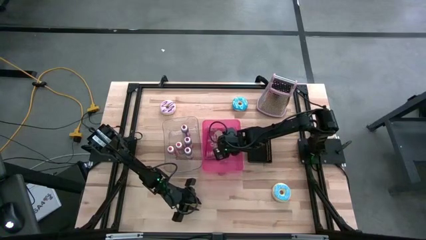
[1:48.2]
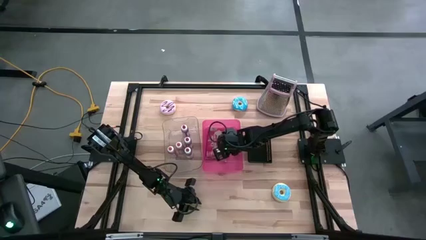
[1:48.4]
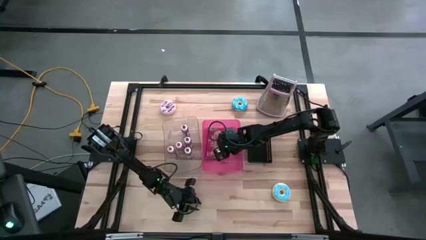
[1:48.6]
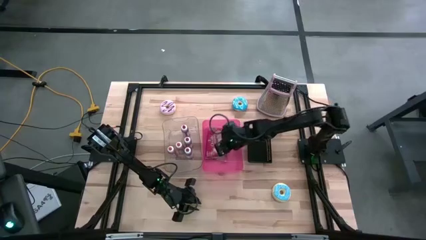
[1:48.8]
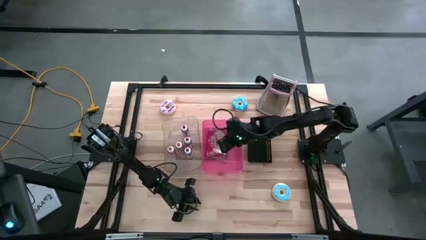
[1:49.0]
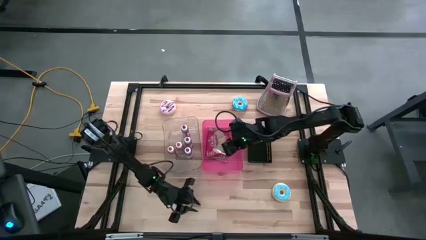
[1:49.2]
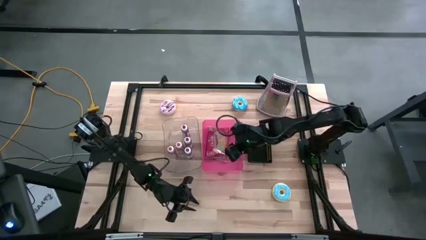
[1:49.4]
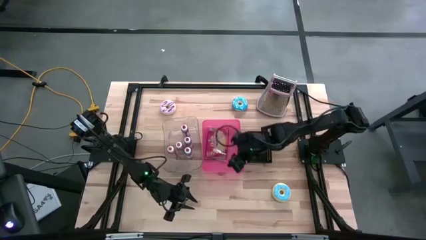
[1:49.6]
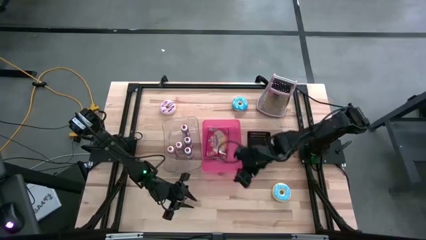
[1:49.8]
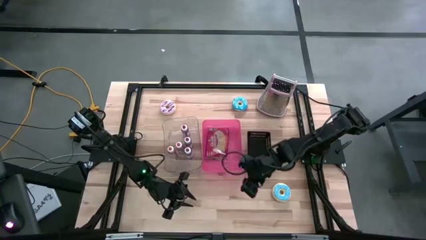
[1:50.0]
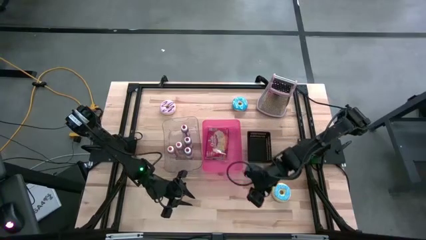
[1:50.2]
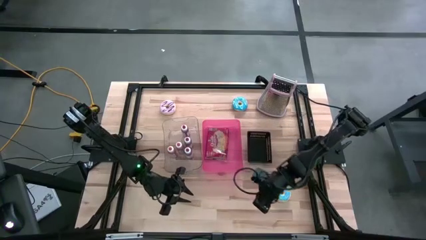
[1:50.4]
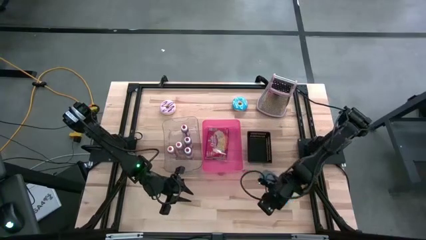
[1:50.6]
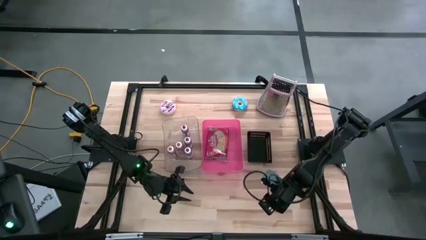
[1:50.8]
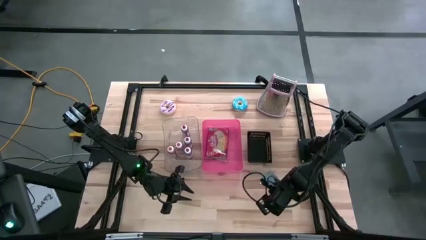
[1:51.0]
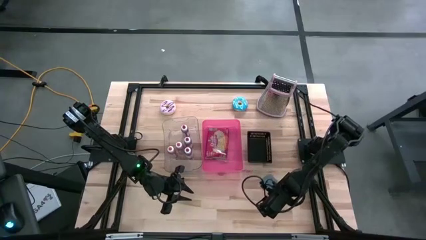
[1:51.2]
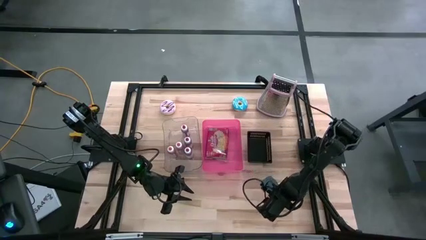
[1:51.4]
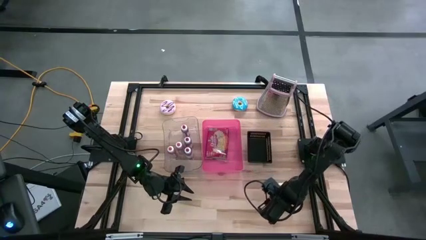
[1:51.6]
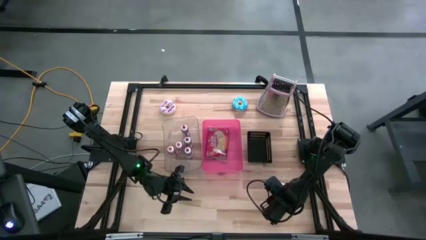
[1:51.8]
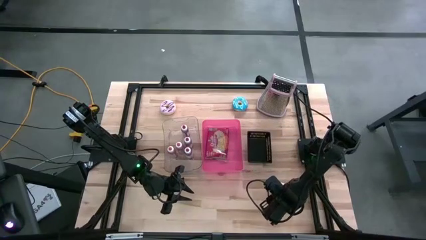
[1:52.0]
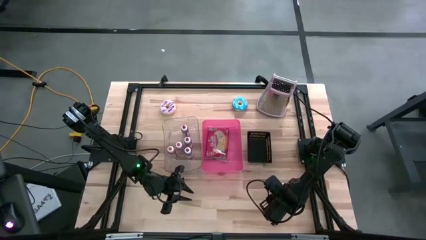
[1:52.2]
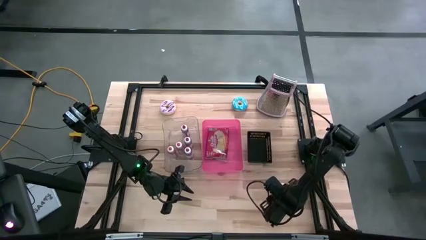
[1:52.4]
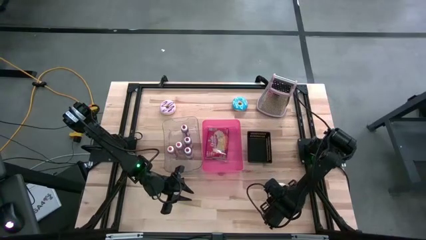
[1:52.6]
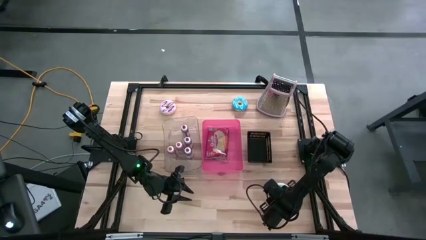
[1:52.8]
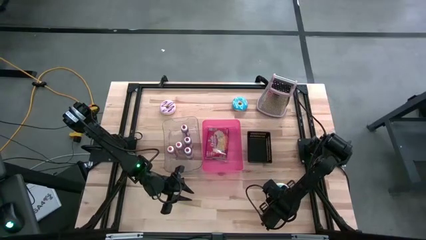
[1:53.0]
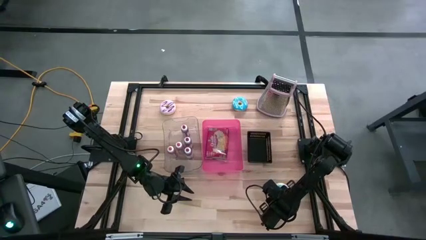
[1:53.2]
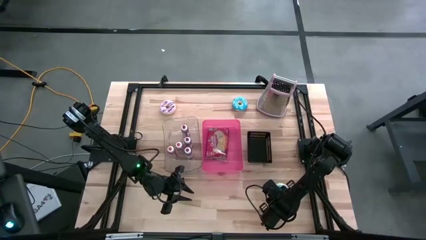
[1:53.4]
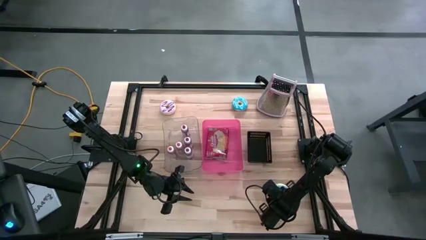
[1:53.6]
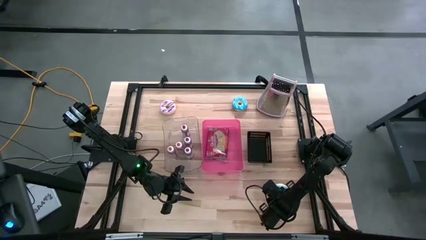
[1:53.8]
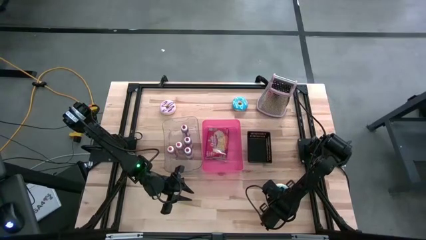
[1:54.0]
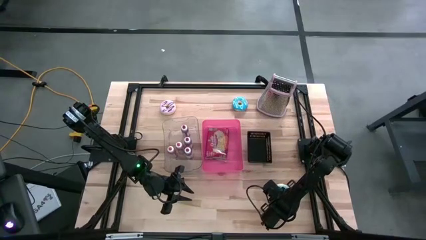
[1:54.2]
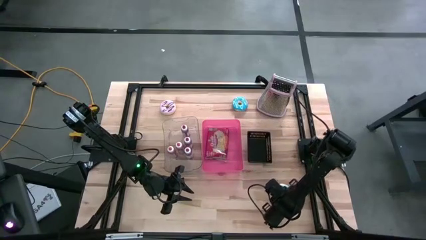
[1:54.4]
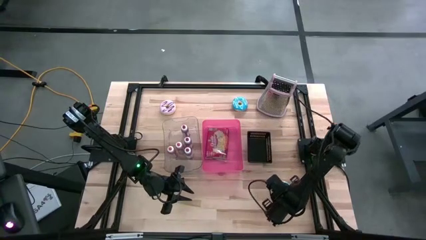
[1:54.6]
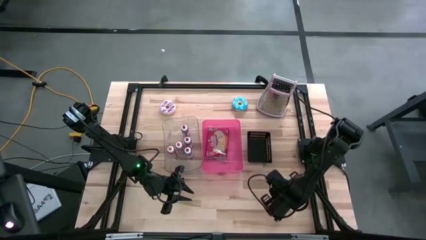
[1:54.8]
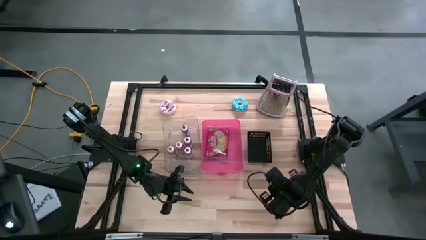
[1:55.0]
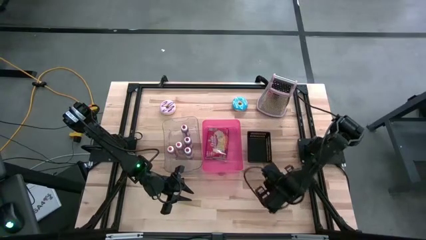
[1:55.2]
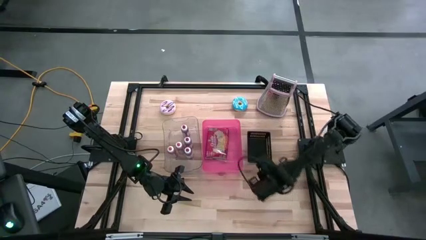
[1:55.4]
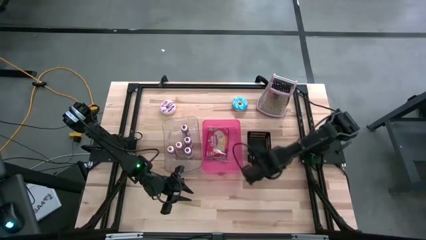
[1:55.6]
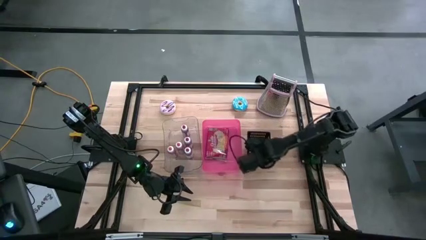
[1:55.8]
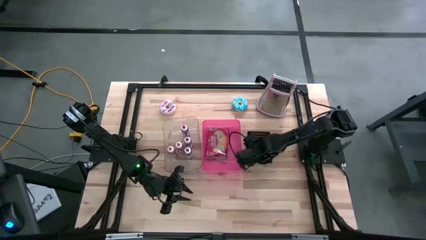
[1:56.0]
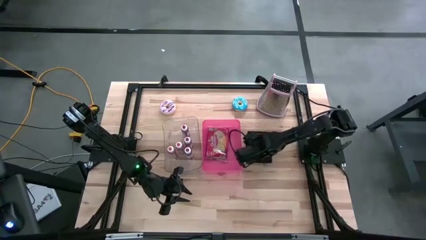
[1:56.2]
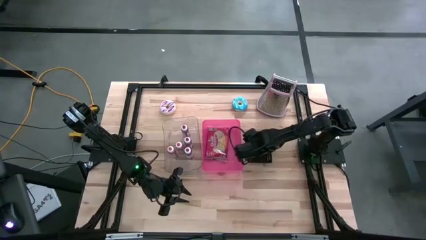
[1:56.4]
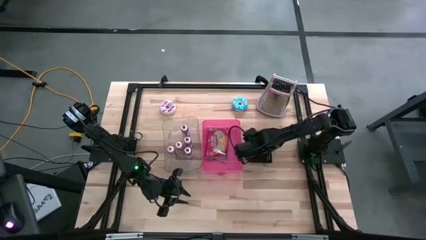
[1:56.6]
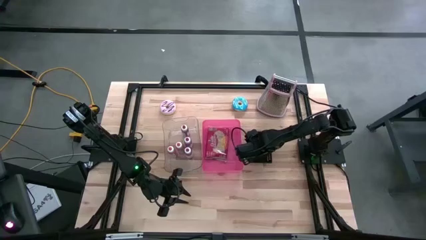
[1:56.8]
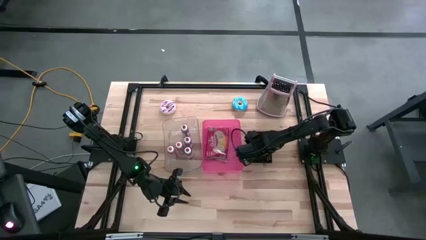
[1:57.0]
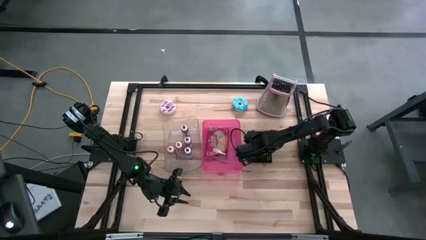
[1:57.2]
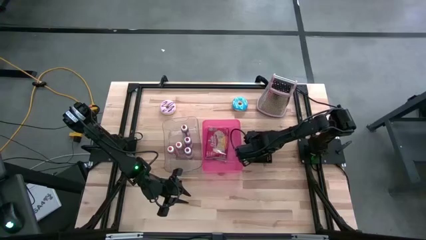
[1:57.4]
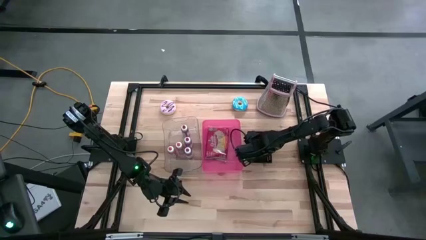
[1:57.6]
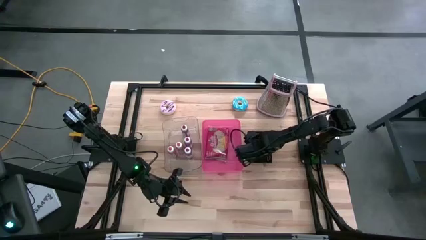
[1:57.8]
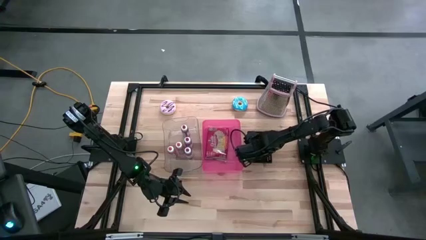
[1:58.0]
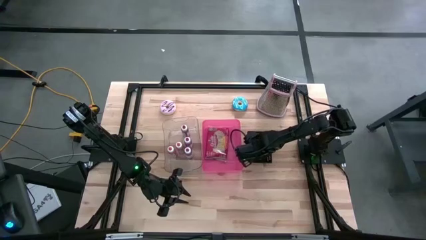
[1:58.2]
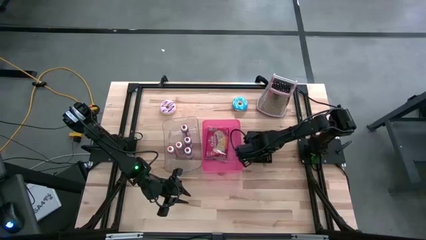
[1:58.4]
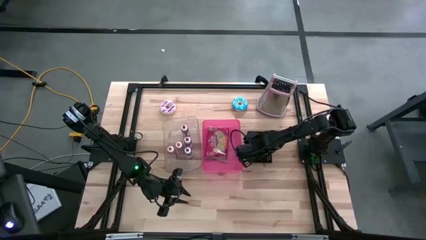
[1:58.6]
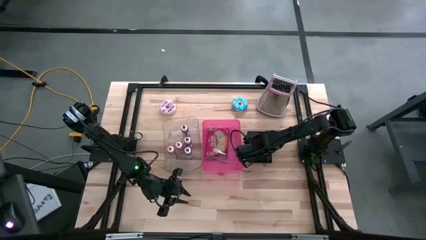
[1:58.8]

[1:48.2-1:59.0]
Task: Pick & Place Food Item
Put the bottom blue donut into the black bin
